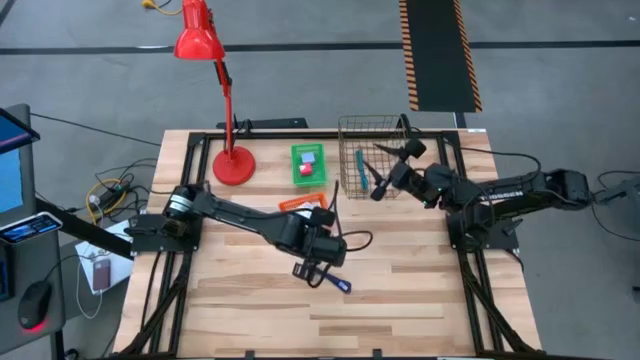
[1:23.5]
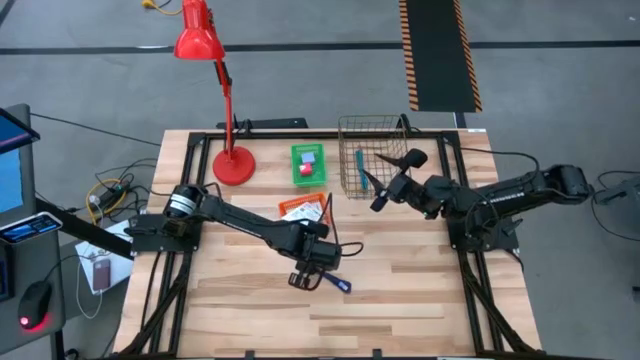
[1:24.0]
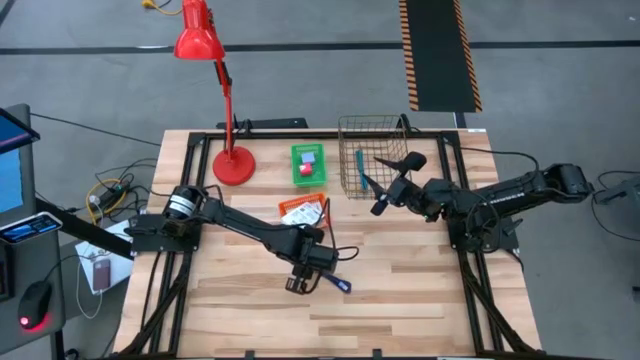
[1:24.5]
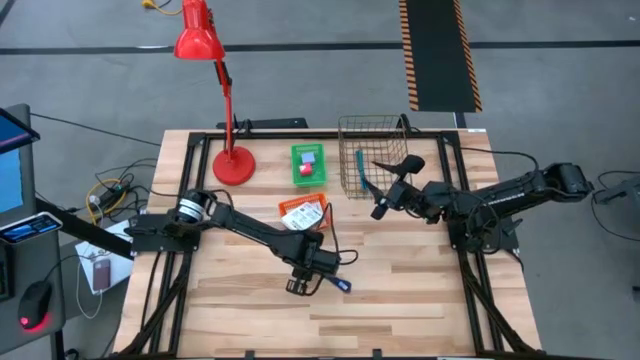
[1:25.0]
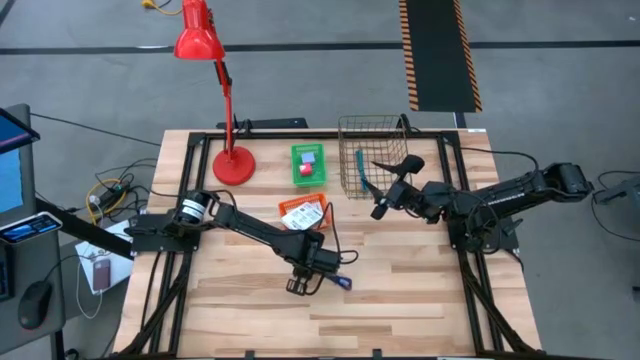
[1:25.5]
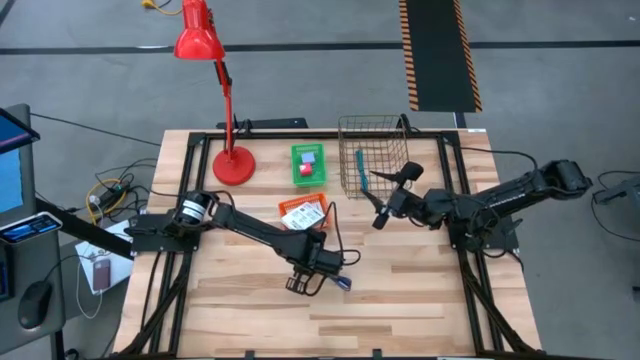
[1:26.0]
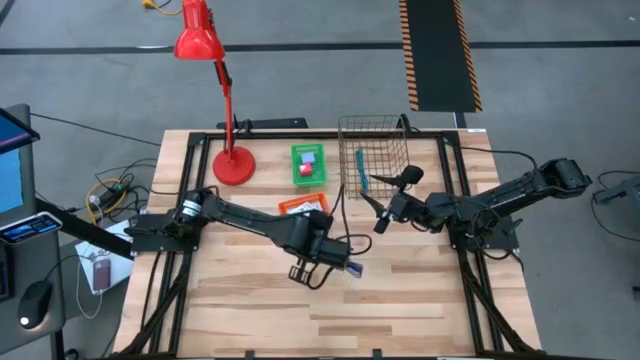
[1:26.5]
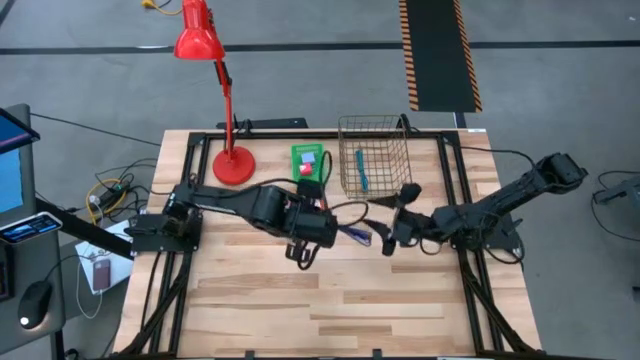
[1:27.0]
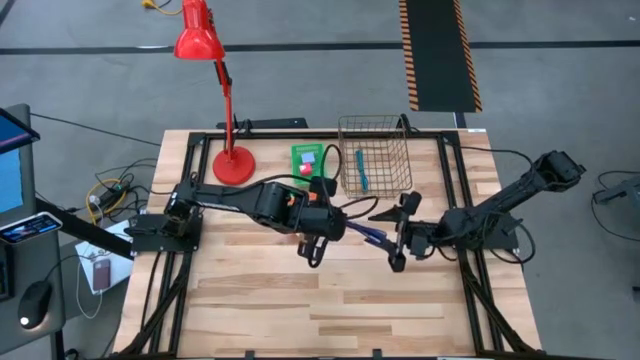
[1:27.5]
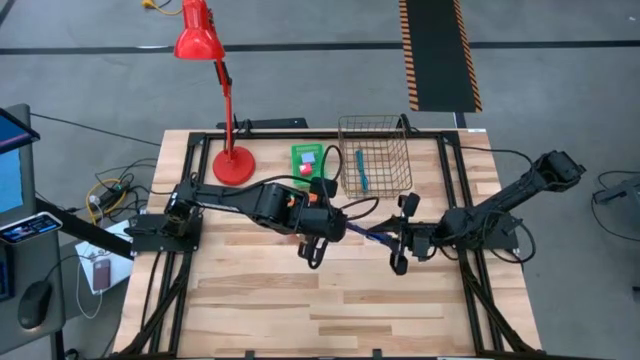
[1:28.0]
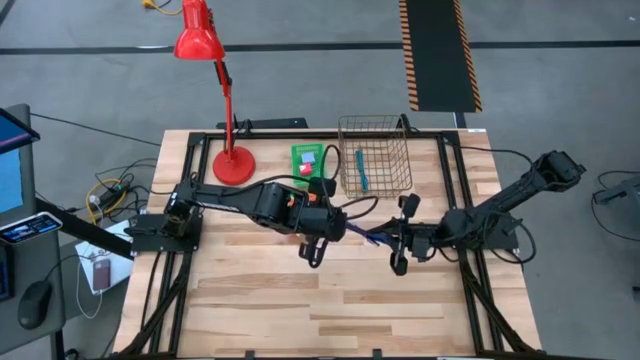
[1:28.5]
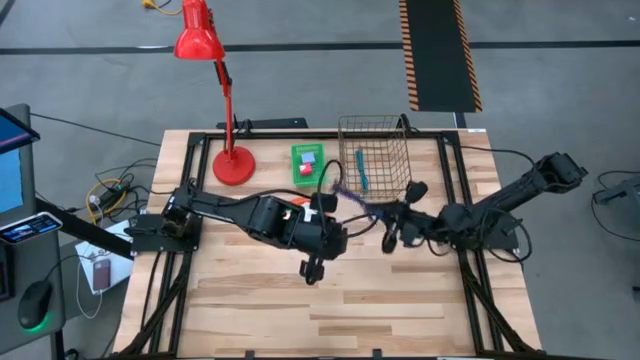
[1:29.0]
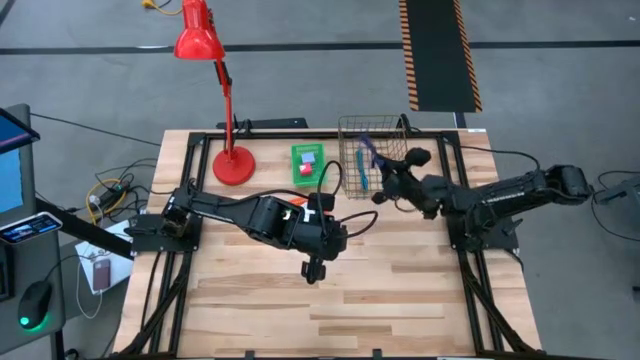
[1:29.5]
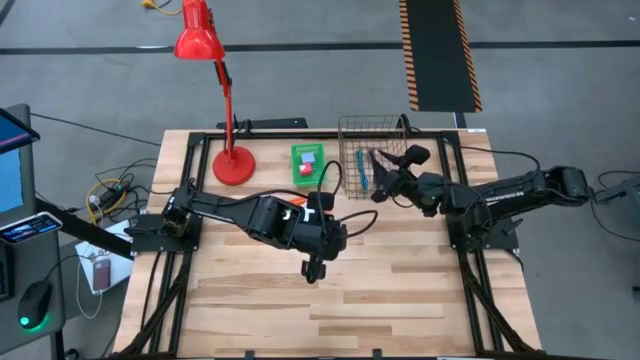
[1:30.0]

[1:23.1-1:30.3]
Task: Pick and place items into bin
Put the blue charger cable into the wire basket

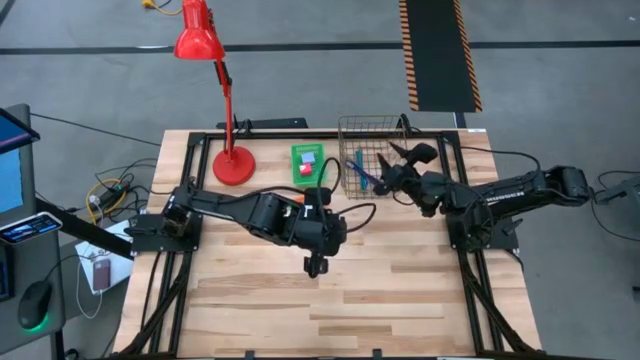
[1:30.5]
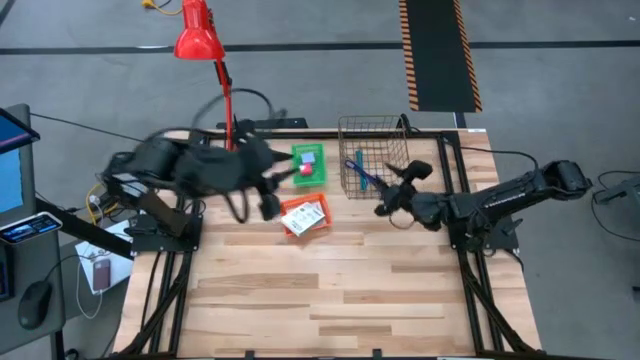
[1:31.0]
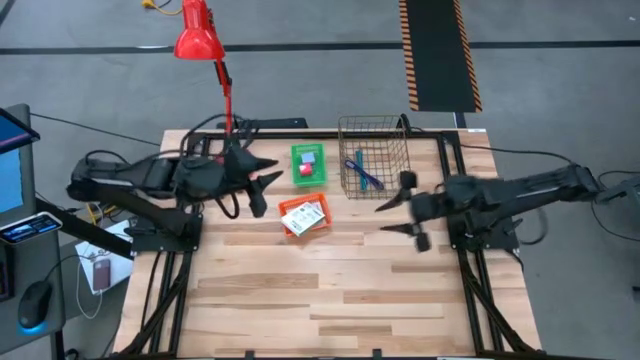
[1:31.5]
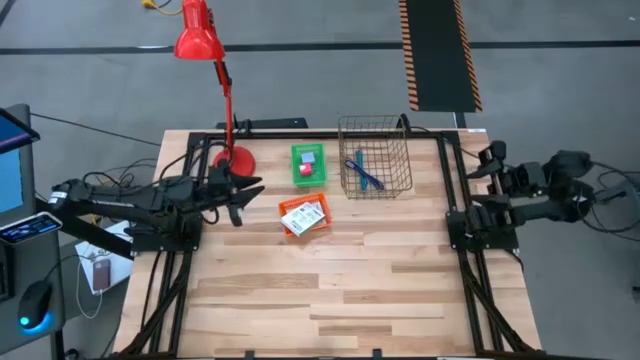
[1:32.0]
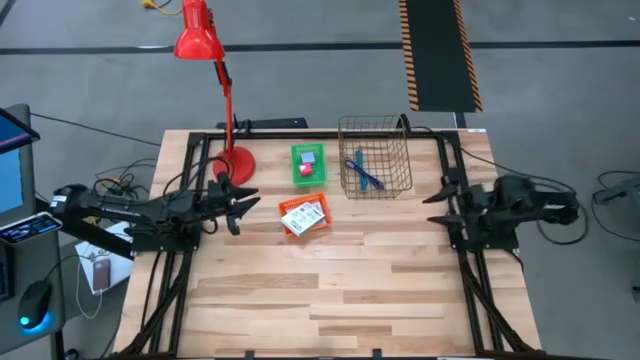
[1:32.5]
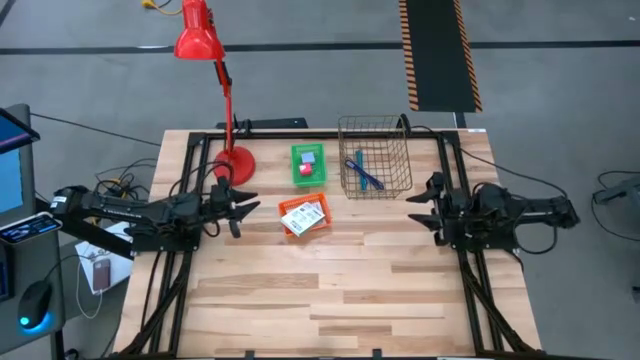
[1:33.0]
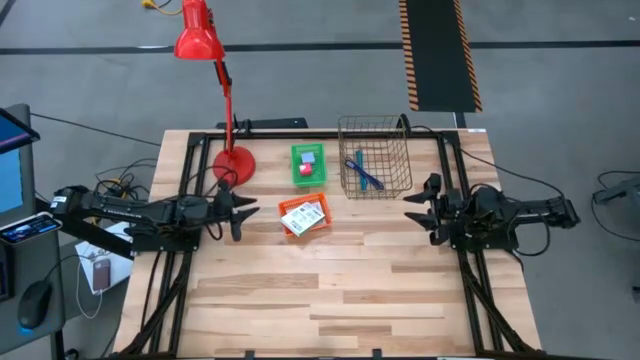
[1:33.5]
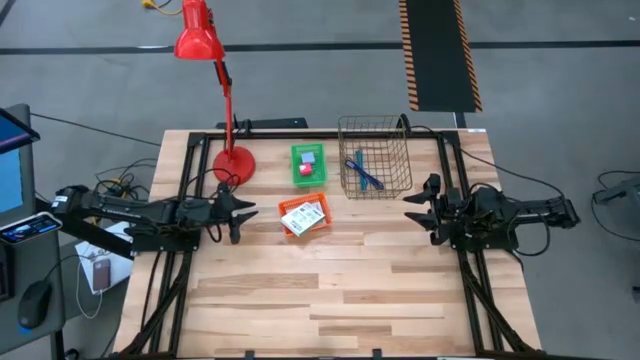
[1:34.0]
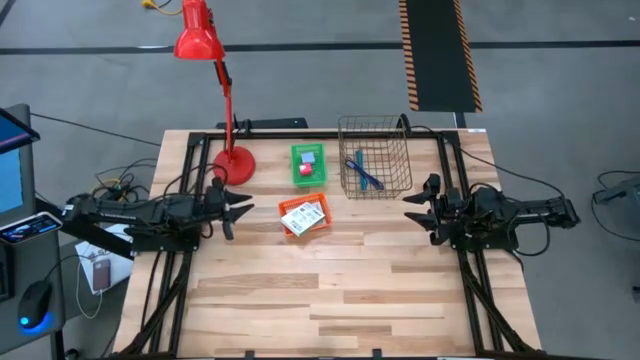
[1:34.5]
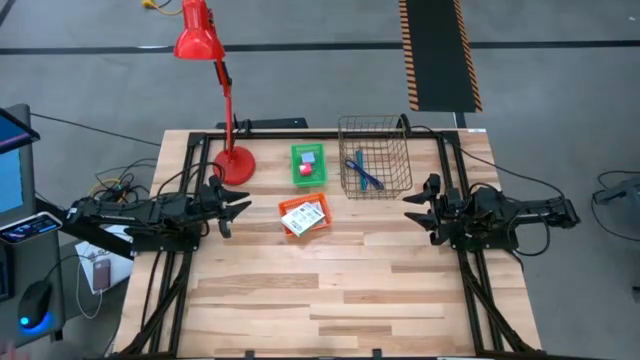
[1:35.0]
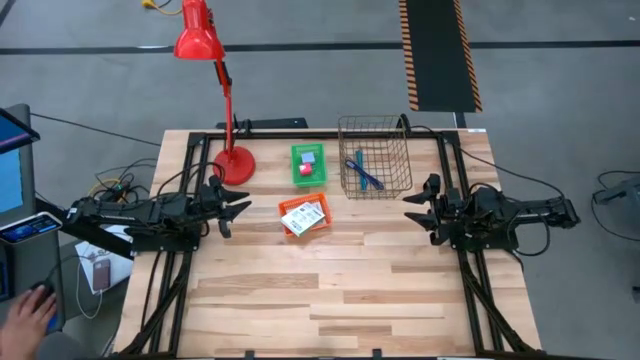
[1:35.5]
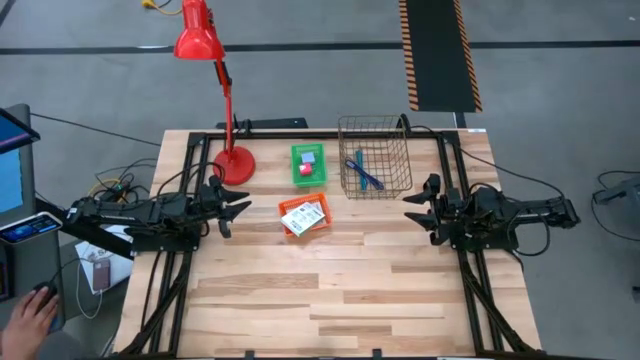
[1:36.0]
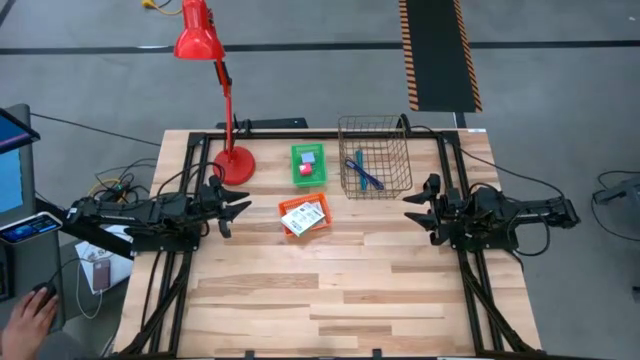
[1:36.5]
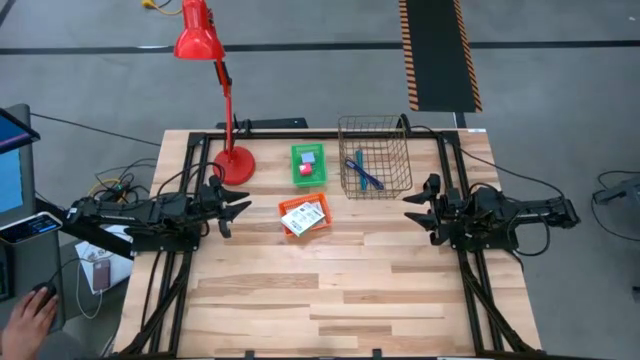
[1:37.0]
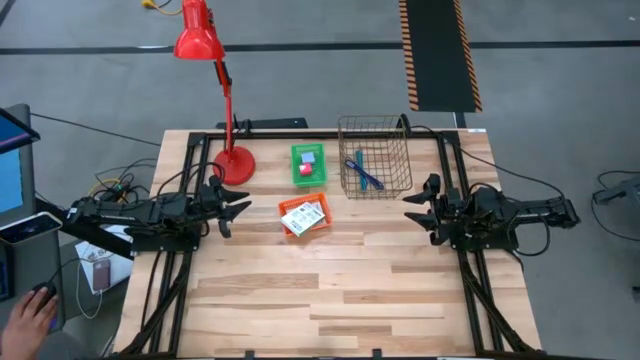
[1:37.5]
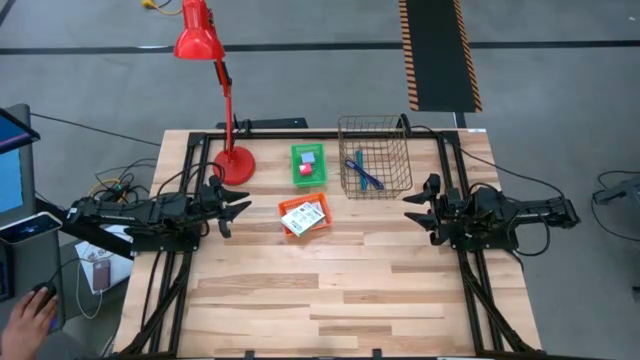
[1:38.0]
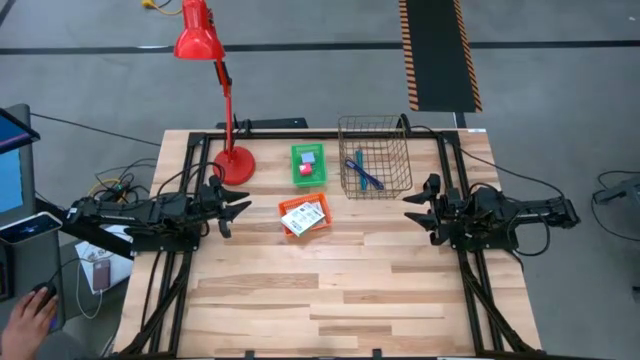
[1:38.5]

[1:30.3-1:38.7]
Return to Home Position

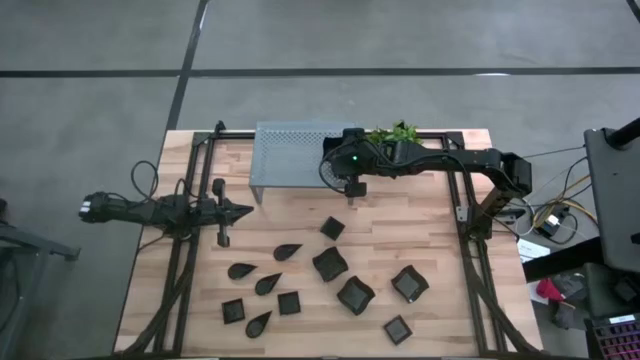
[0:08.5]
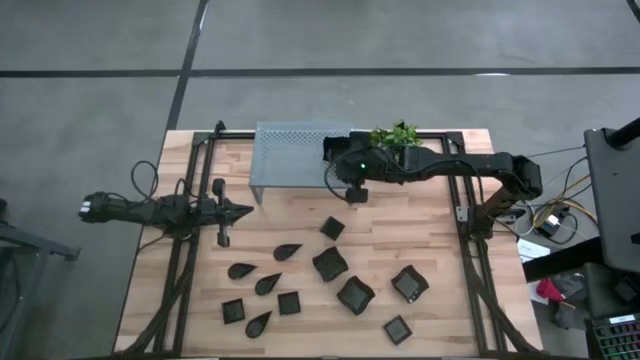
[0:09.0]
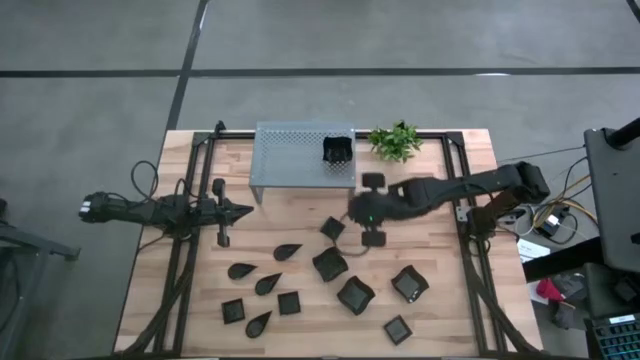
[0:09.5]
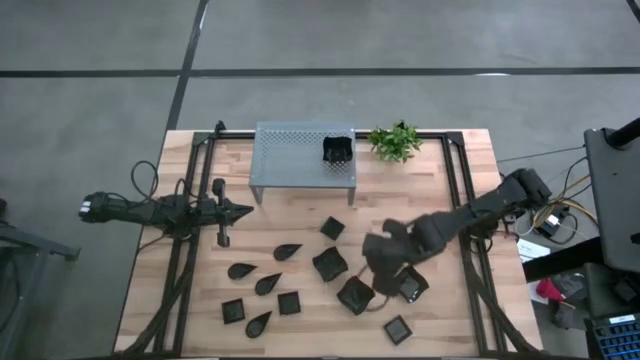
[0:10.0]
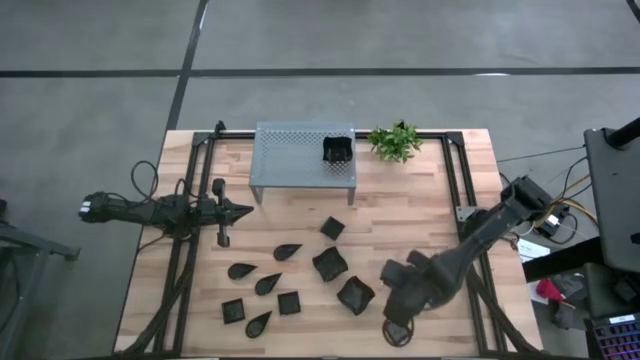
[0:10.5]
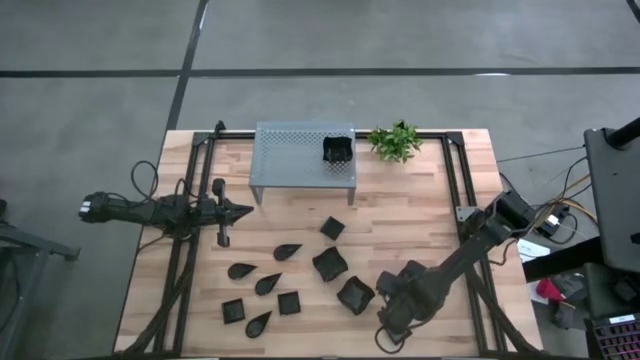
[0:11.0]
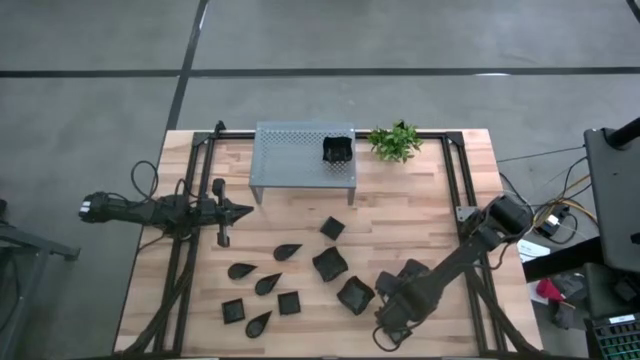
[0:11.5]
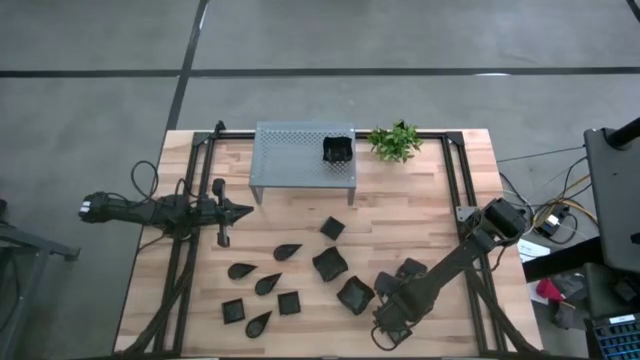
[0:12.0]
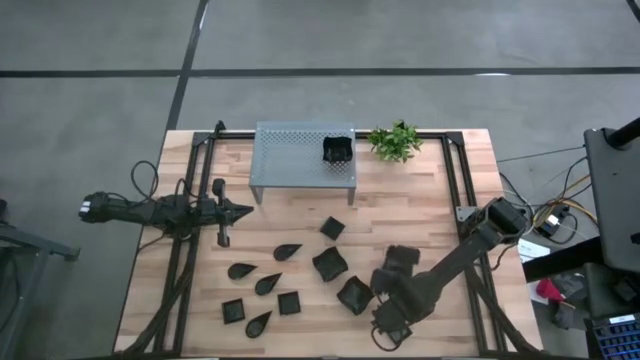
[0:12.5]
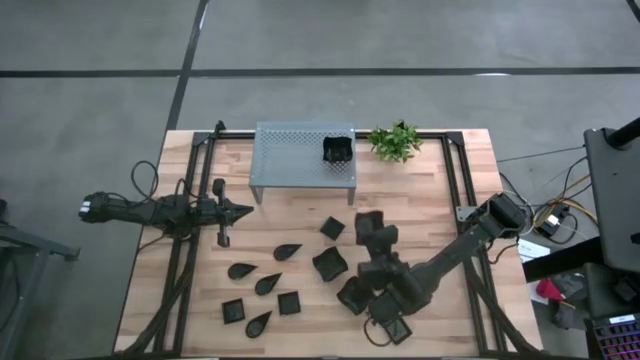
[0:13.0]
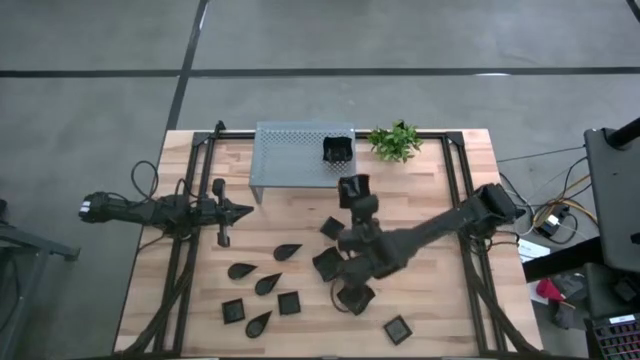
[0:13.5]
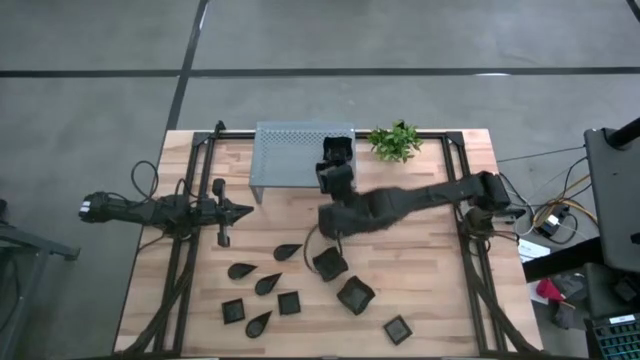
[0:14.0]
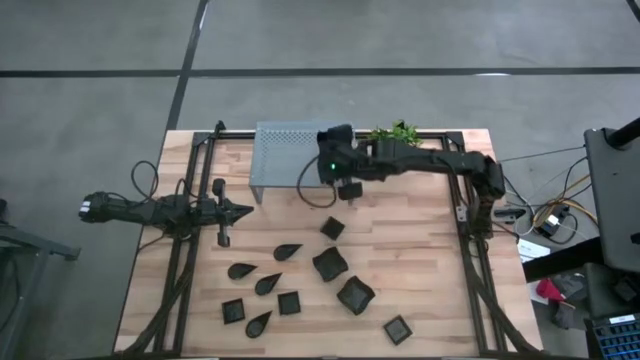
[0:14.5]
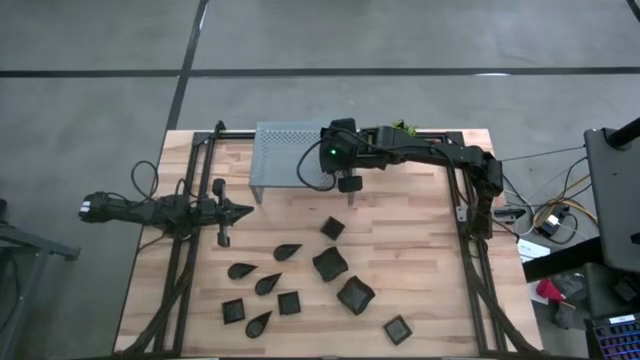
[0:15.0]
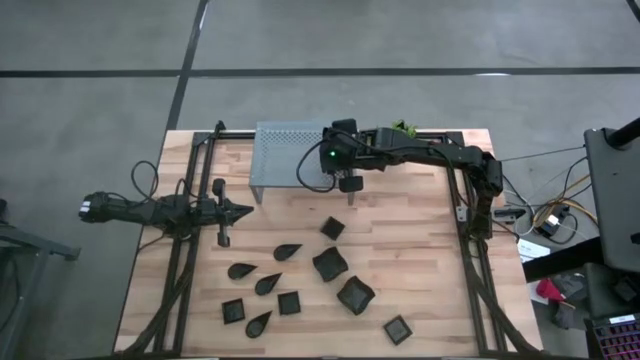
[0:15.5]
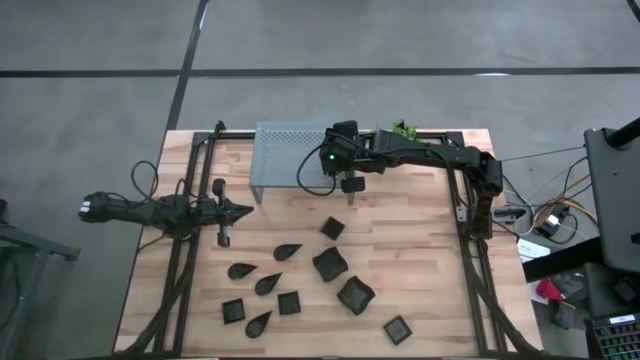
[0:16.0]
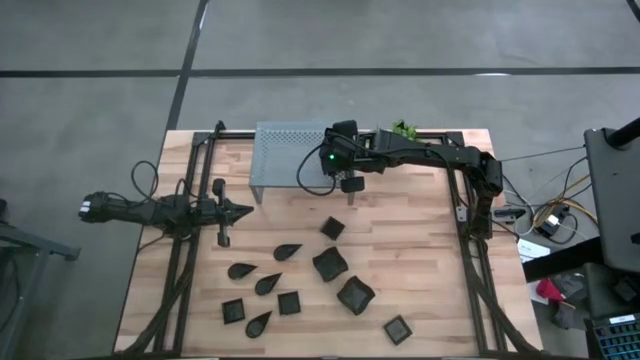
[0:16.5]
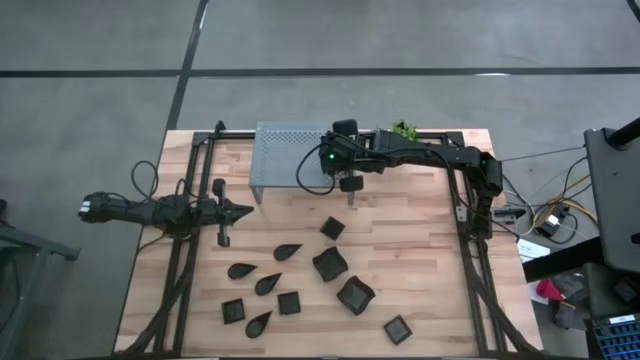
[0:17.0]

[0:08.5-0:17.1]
Task: Pick & Place Mini shaped plates
Stack the black distorted square plate on top of the black distorted square plate on the shelf
